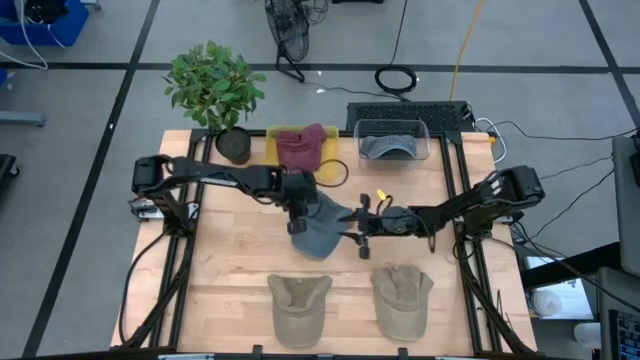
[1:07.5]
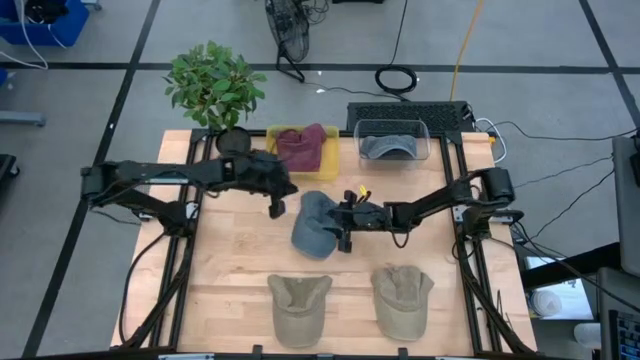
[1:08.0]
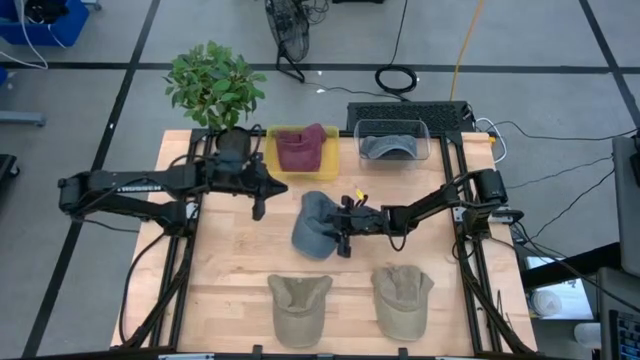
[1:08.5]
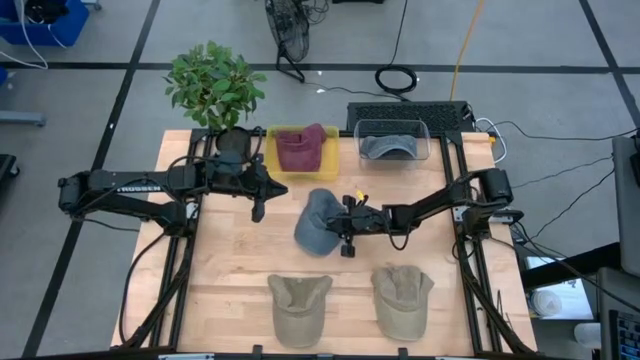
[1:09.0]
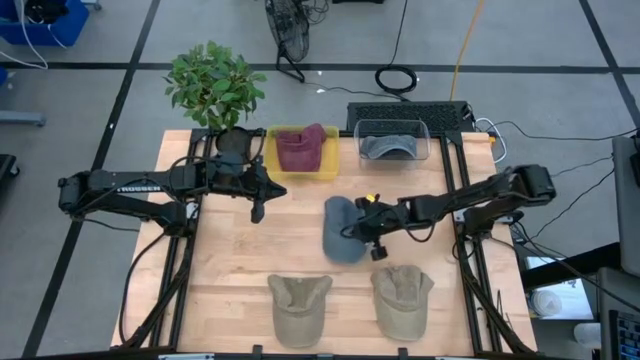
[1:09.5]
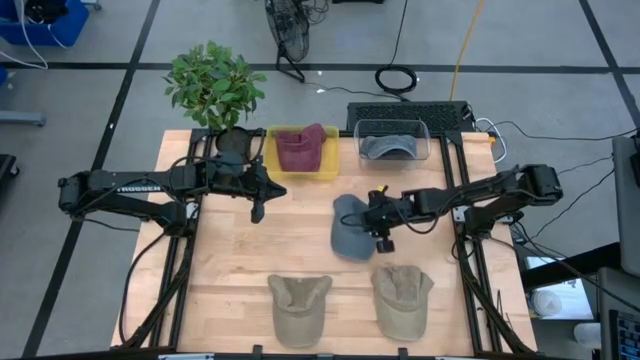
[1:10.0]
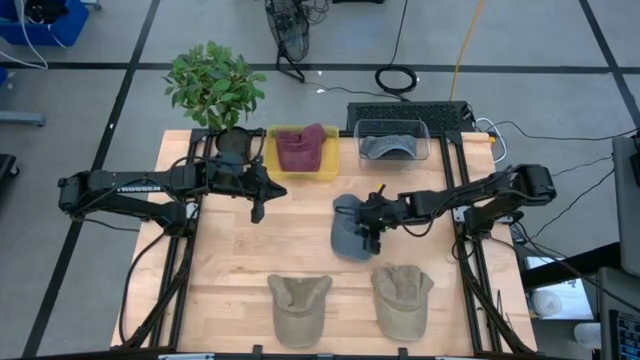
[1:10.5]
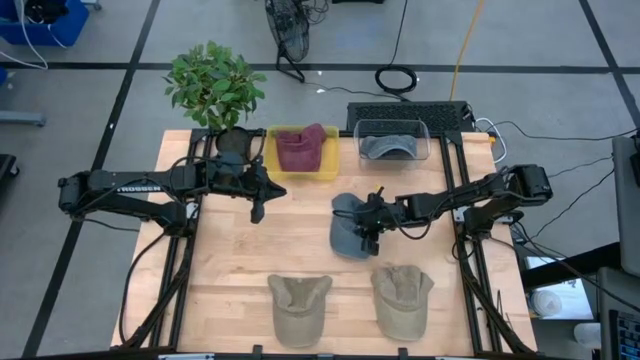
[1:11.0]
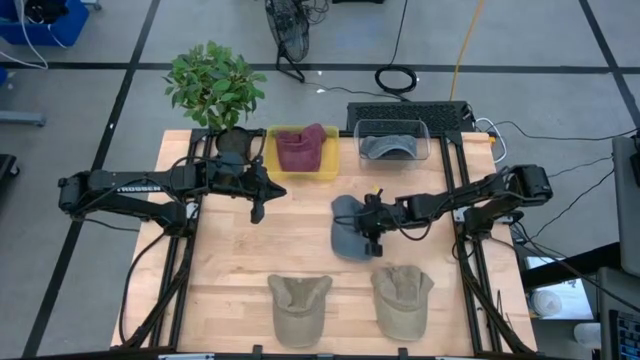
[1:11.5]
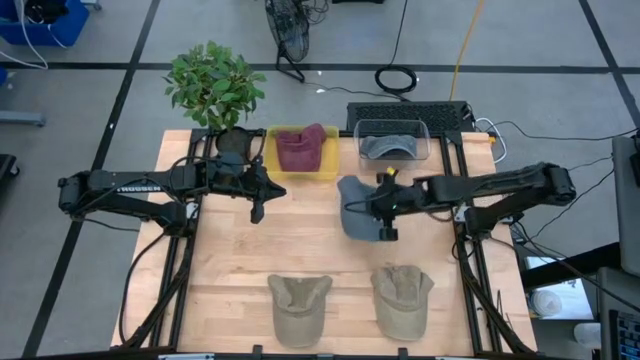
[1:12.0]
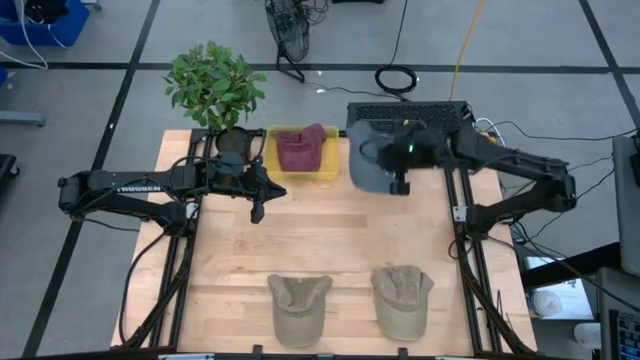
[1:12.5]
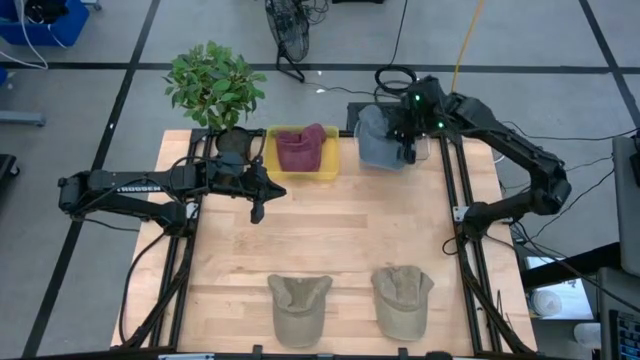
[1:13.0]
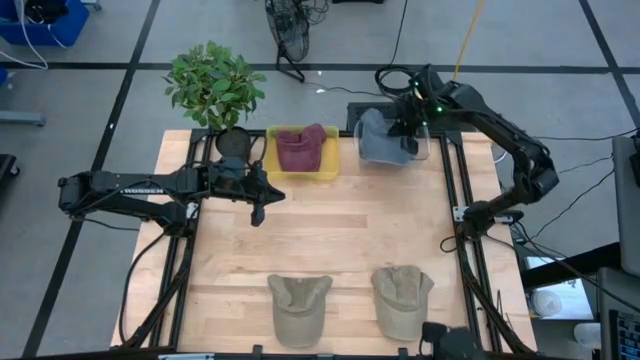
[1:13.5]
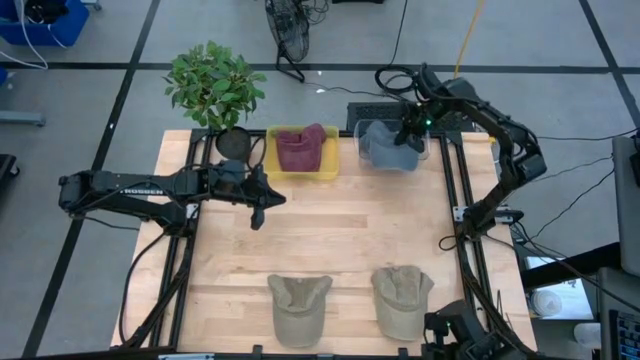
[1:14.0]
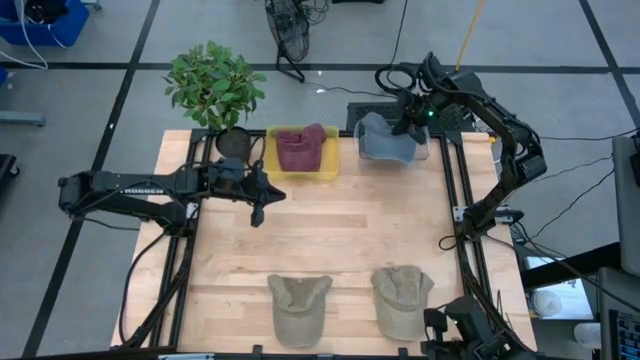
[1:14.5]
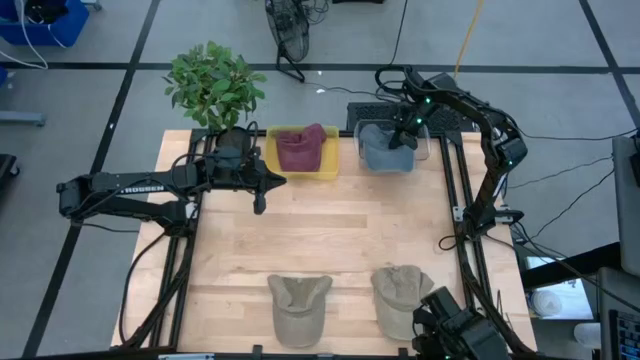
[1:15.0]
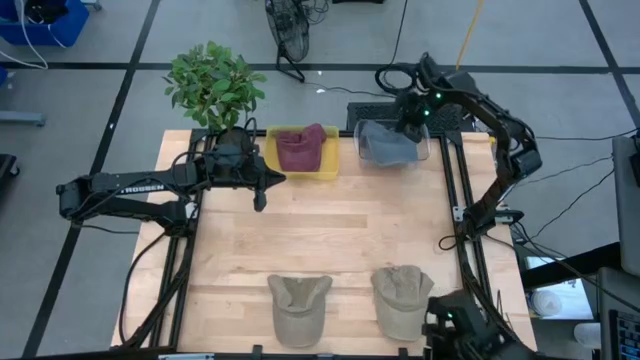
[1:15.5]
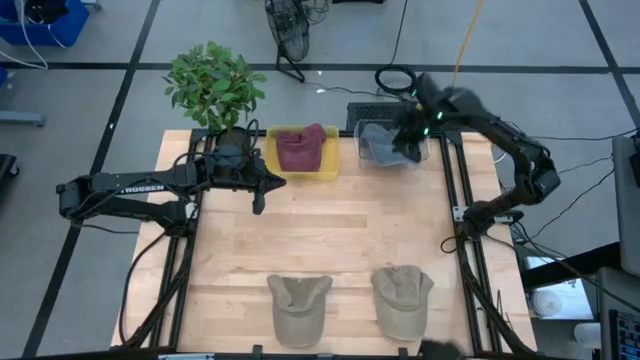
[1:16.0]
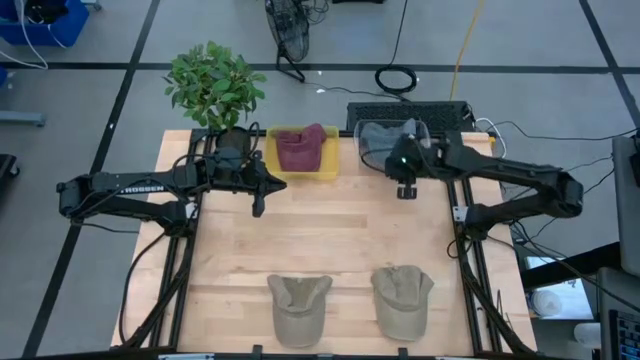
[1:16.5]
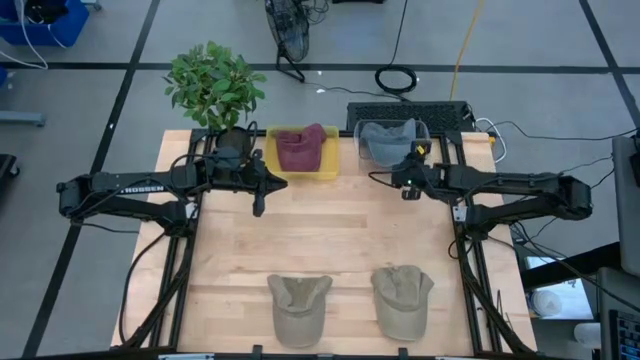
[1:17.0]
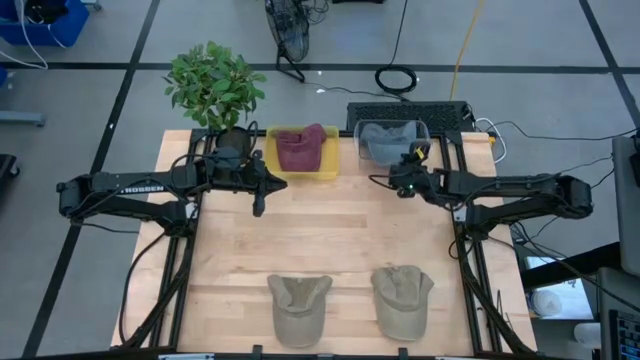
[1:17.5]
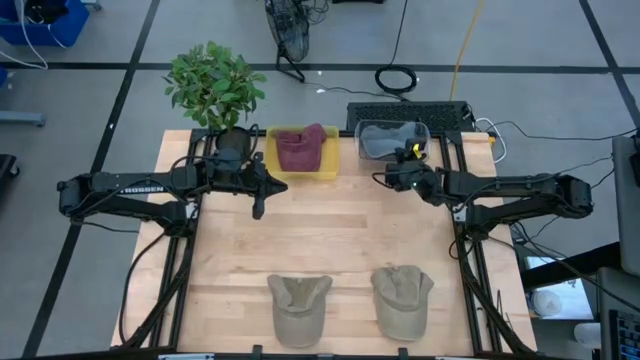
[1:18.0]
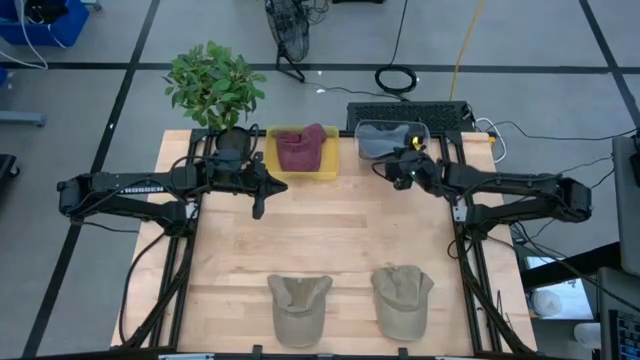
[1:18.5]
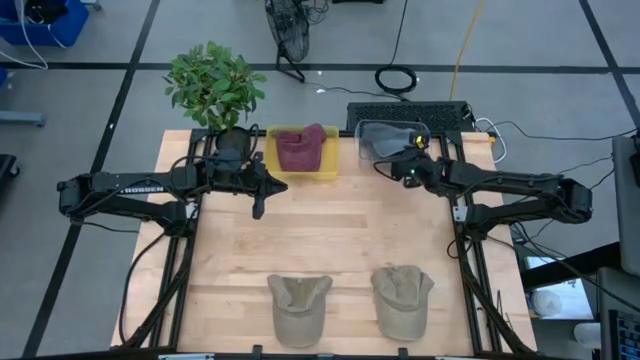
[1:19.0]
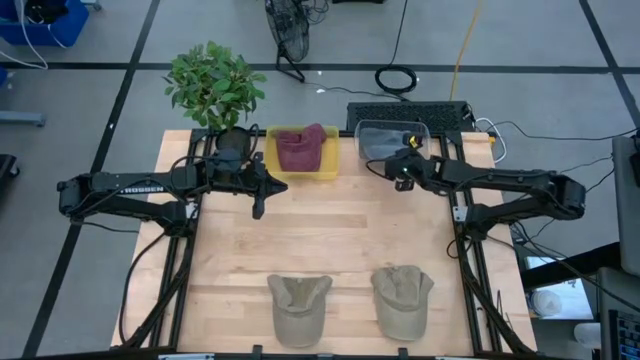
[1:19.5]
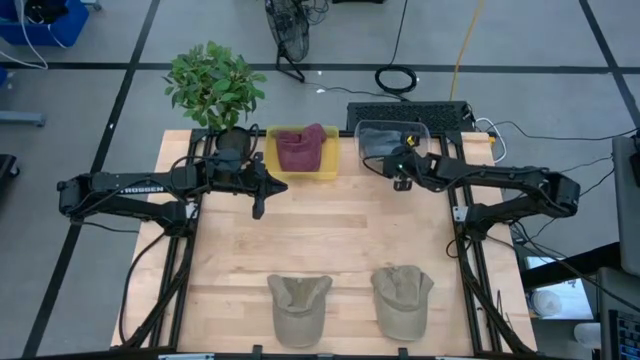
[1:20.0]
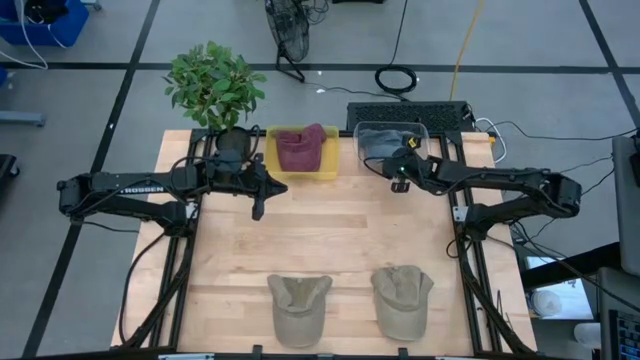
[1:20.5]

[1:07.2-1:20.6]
Task: Pick & Place hat
Put the blue cap into the transparent bin

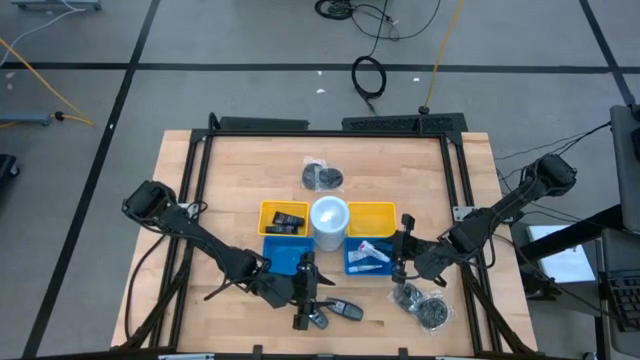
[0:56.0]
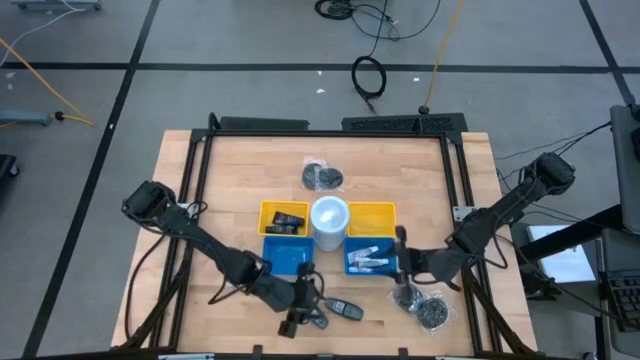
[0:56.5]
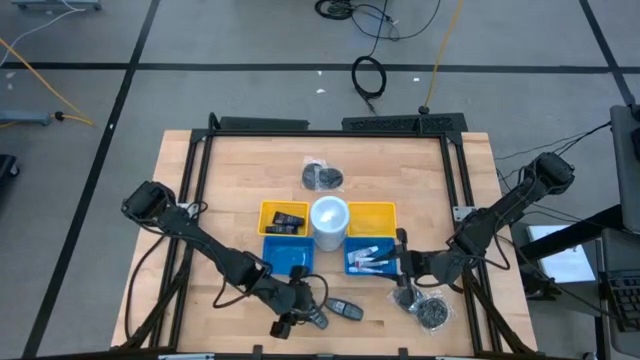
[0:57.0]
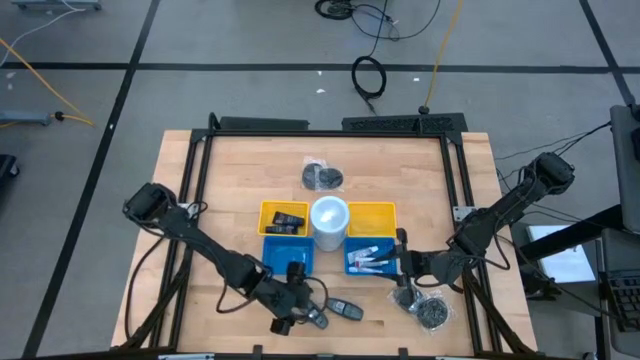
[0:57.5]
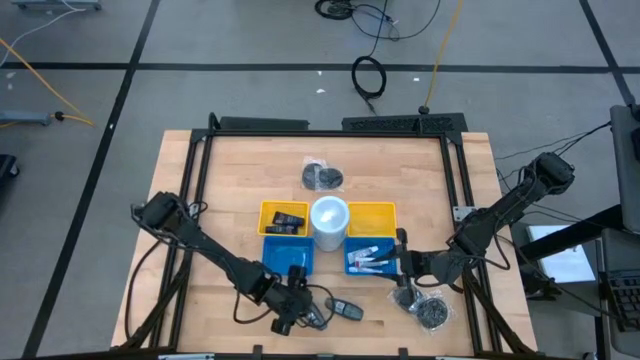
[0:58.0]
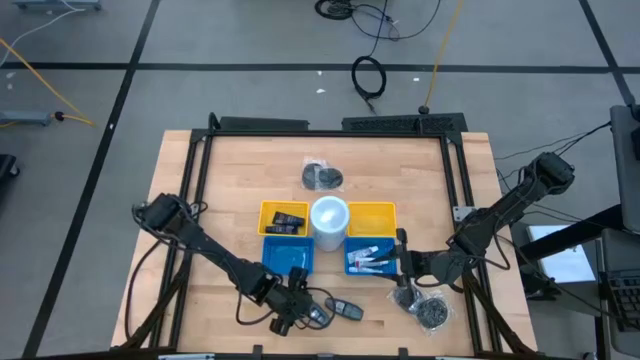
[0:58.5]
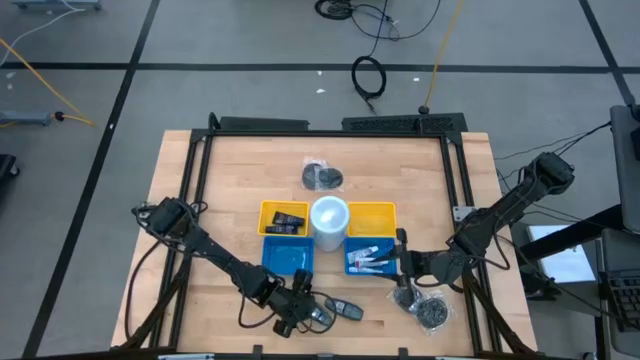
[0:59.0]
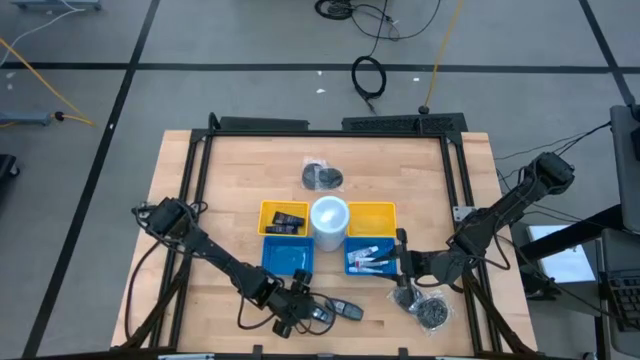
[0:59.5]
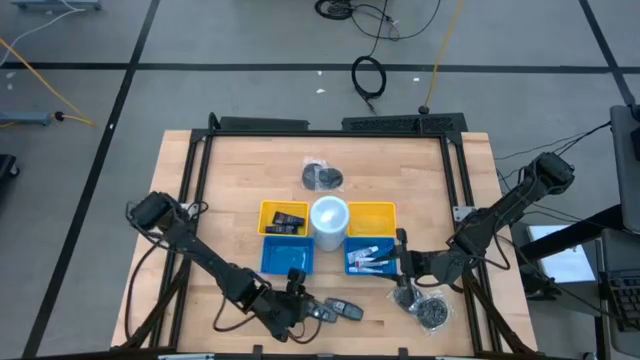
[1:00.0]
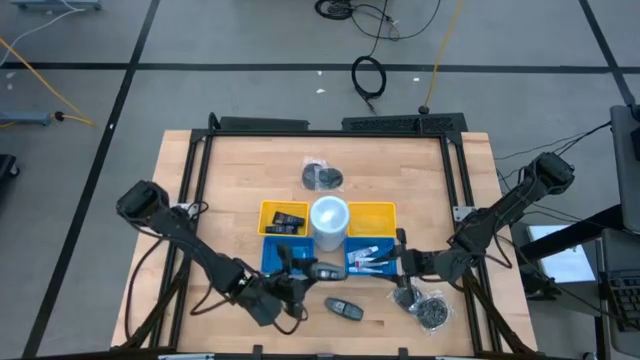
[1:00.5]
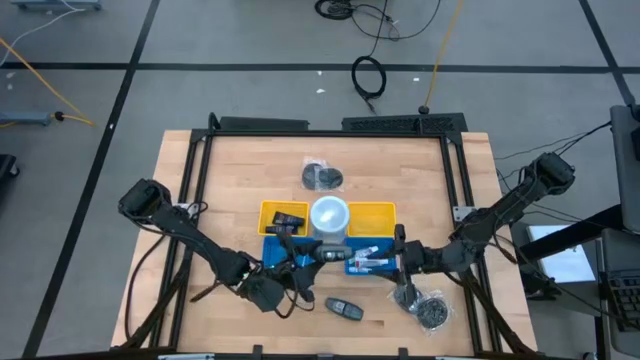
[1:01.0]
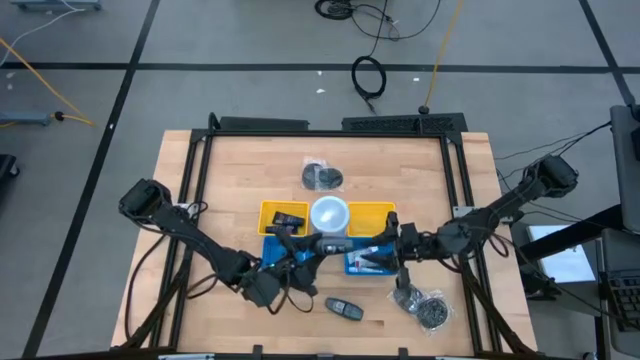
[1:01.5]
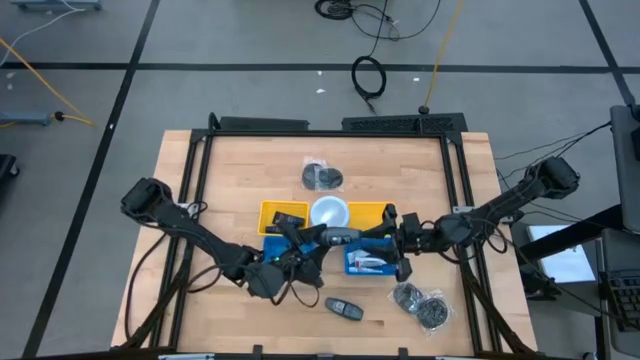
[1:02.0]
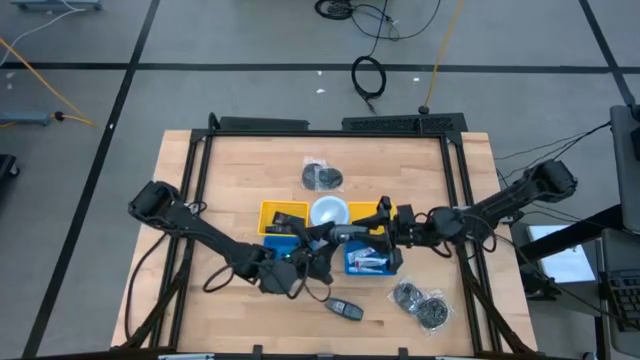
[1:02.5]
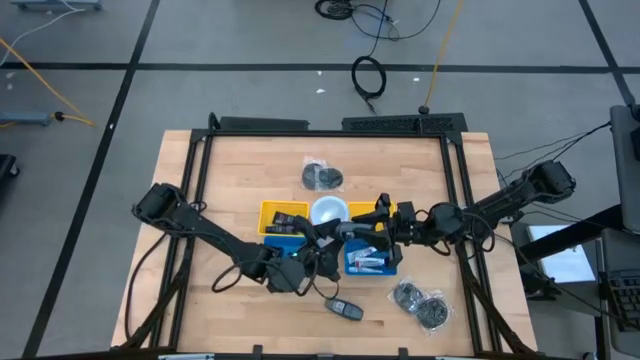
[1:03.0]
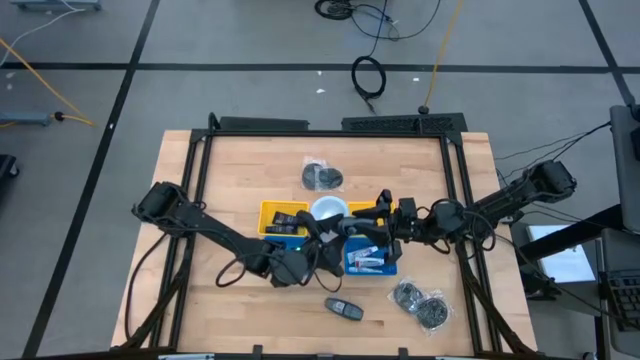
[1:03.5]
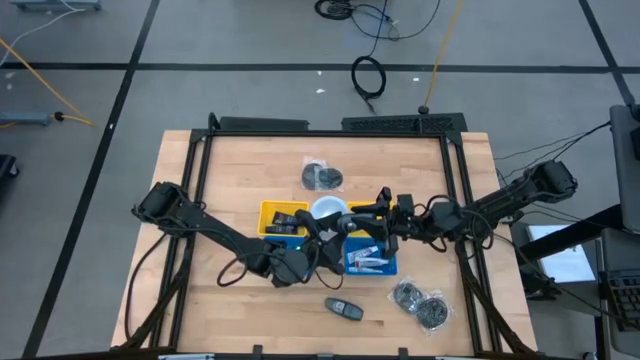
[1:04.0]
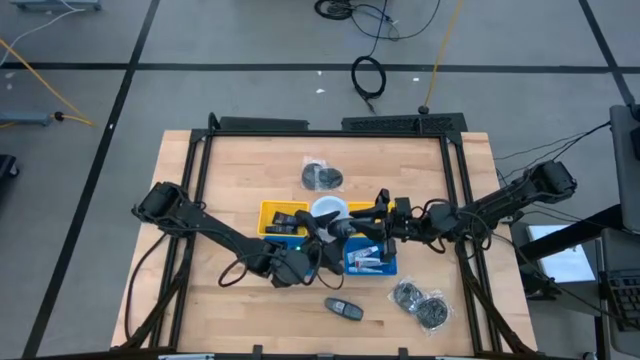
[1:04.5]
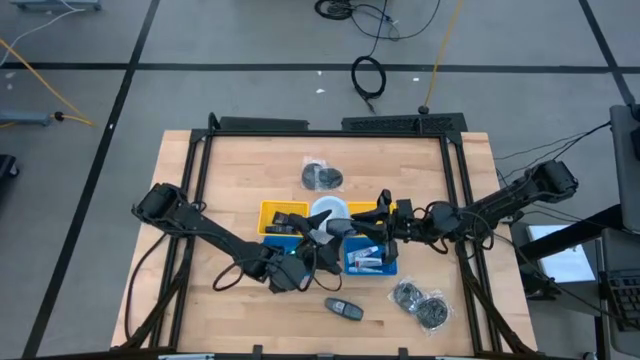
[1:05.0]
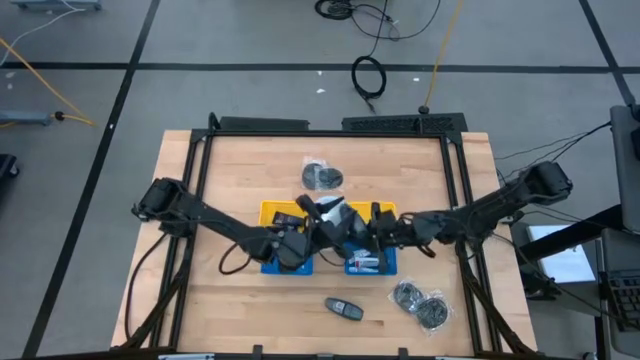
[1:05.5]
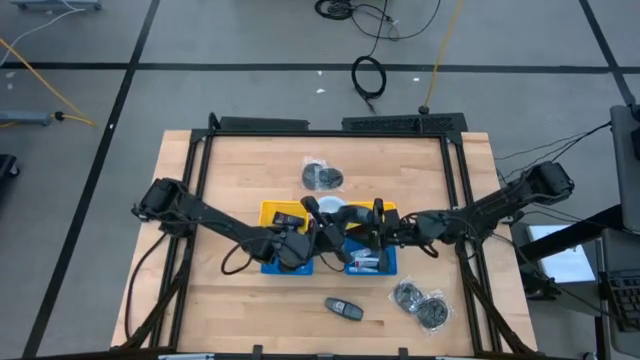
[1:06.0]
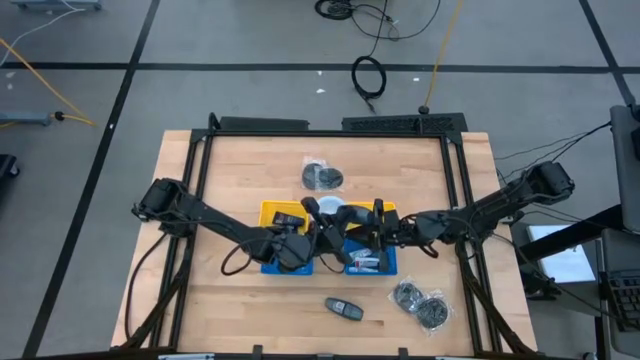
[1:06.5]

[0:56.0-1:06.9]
Task: Pick & Place Travel size toiletries
Put the deodorant into the right yellow bin
